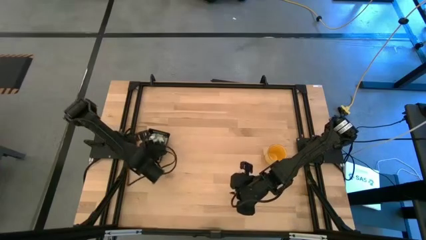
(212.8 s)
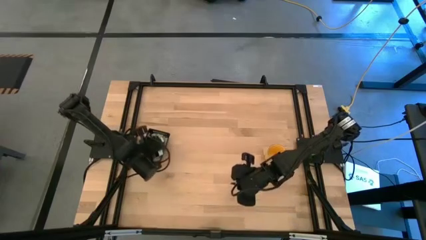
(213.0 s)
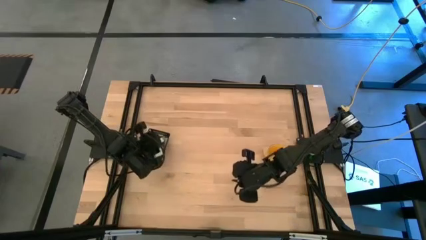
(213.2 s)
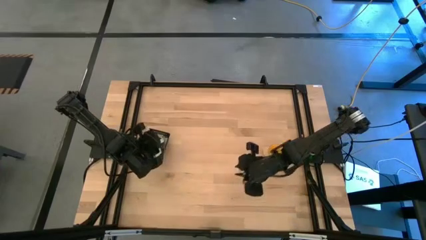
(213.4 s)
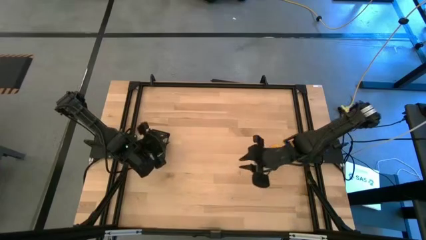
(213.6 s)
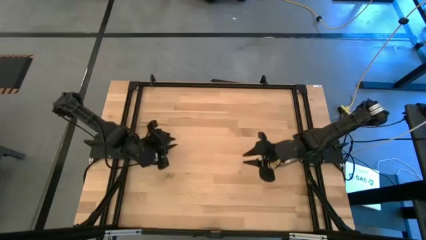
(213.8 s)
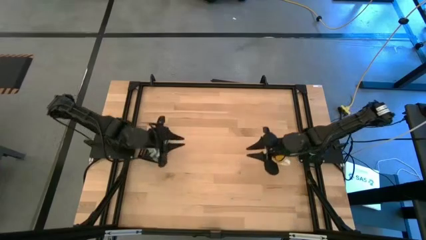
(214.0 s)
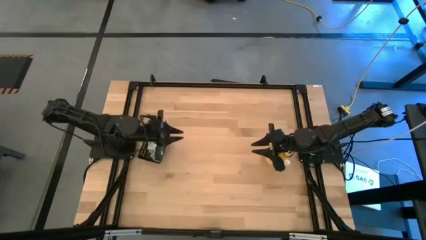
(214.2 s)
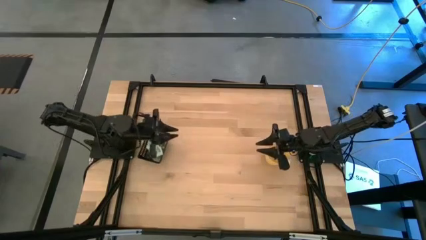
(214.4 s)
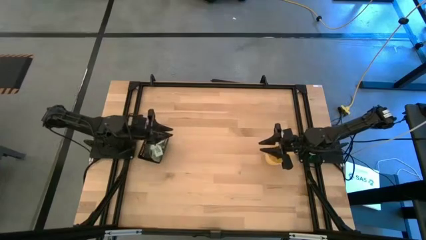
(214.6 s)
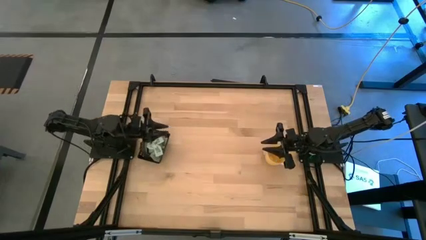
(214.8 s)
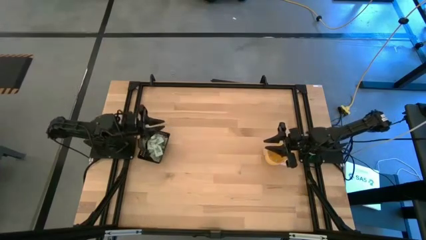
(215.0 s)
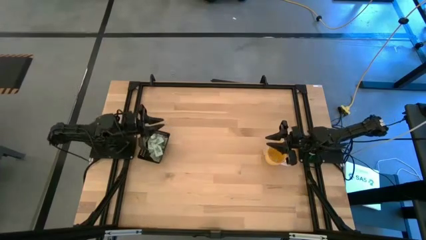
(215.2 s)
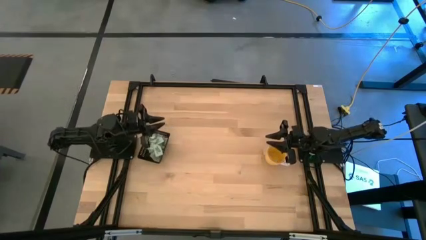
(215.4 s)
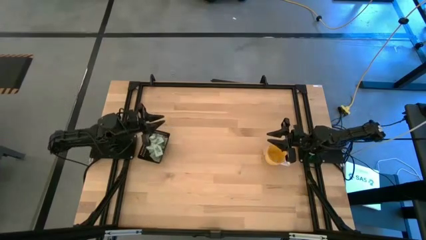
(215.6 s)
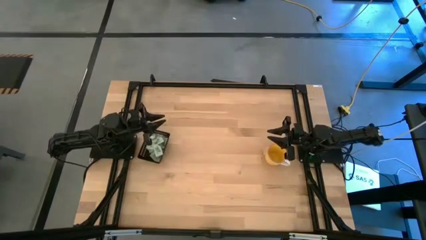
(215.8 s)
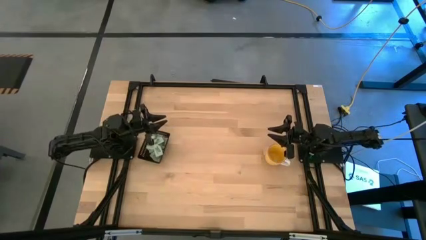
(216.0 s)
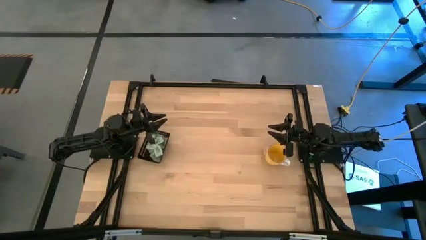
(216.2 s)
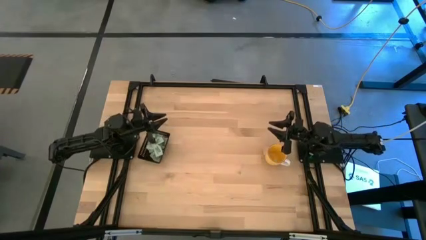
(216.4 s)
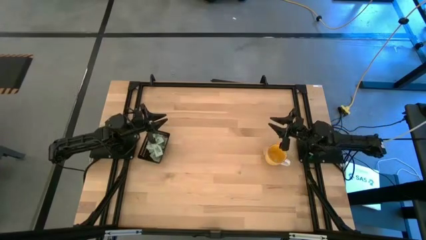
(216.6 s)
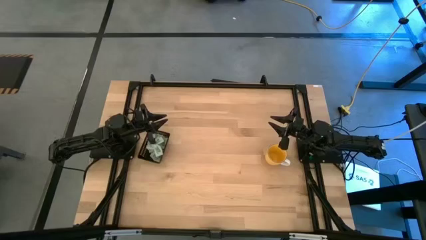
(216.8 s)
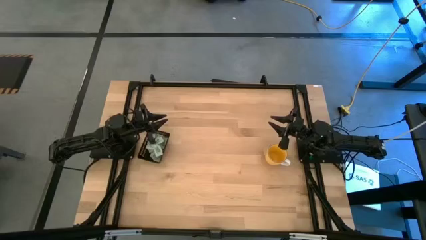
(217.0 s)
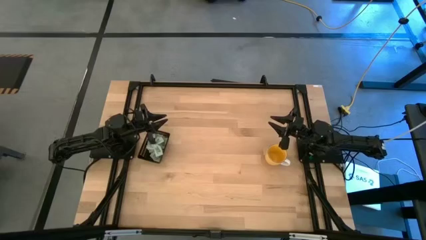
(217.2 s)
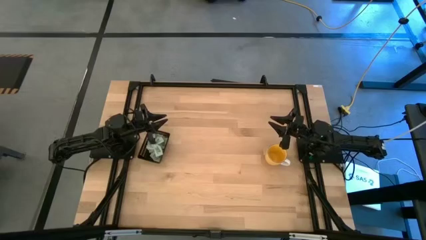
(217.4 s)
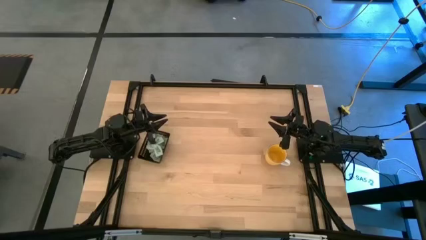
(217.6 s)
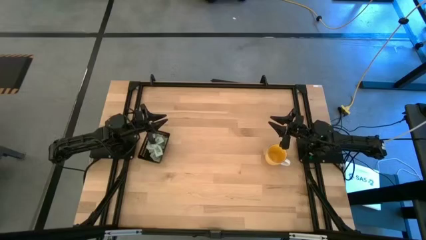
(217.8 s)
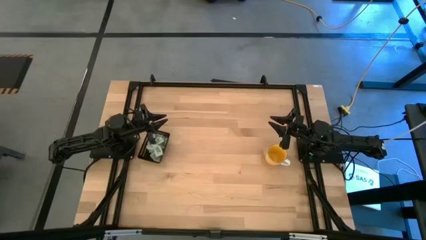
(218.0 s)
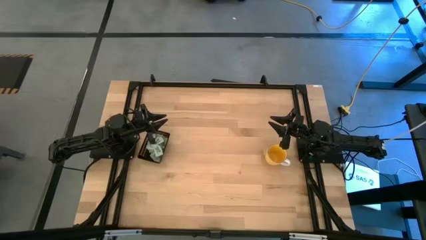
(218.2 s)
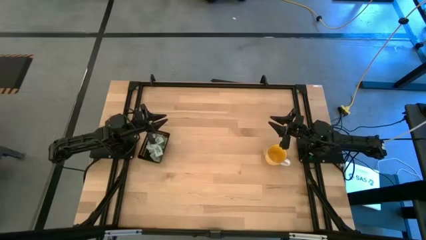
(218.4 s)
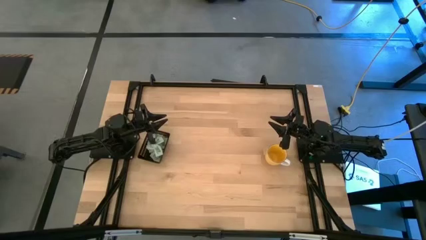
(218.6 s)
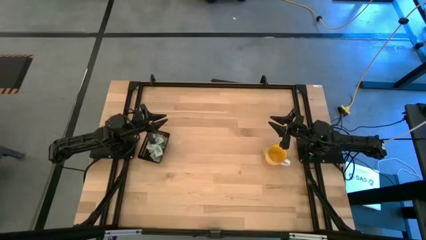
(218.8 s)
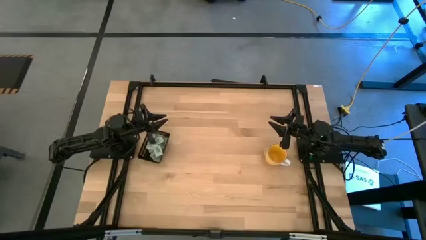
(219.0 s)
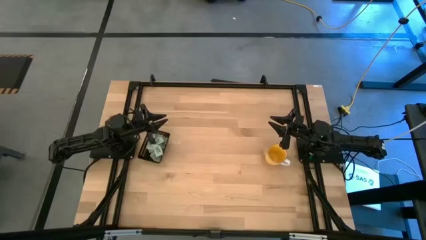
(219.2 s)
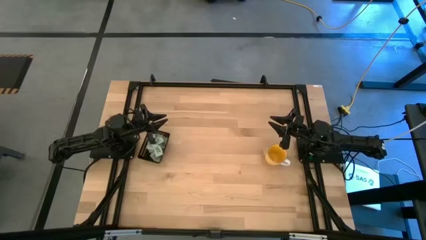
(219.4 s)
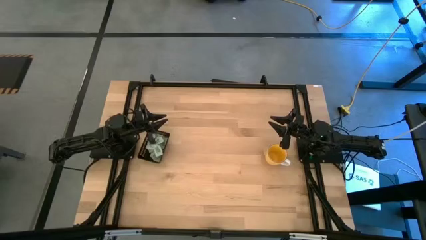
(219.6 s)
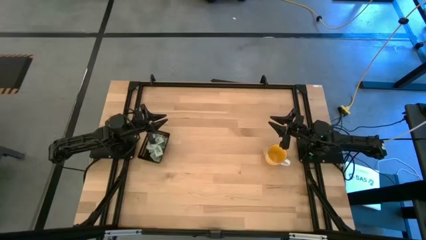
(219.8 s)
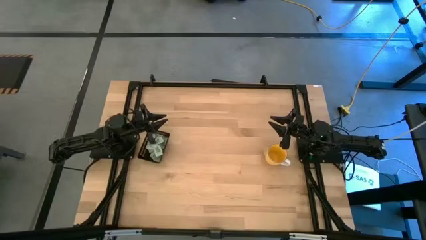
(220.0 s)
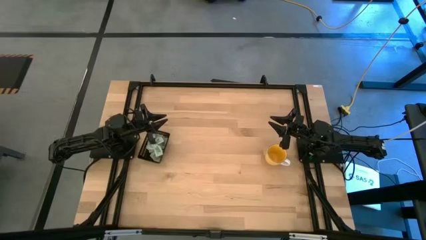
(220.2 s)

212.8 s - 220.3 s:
Task: Pick and place Stevia / Truvia into bins
Return to Home Position

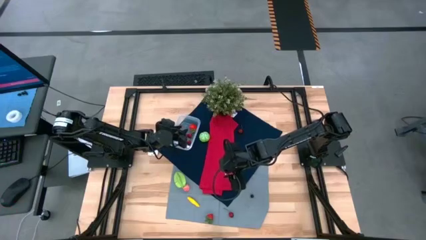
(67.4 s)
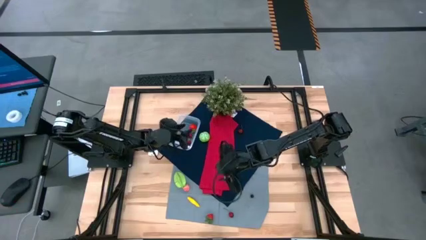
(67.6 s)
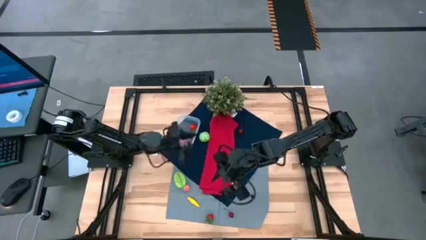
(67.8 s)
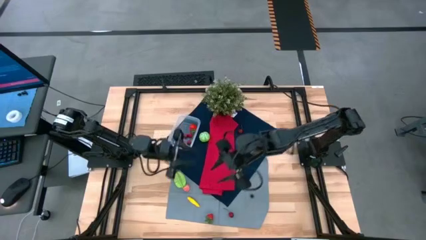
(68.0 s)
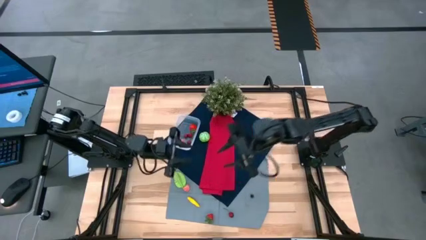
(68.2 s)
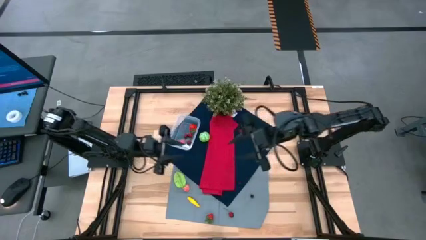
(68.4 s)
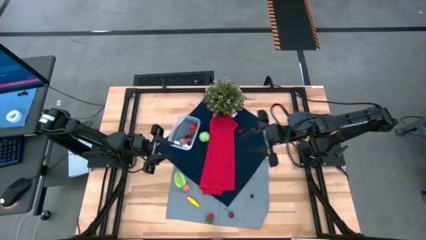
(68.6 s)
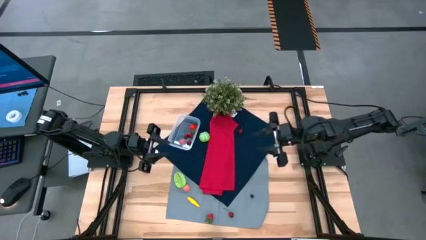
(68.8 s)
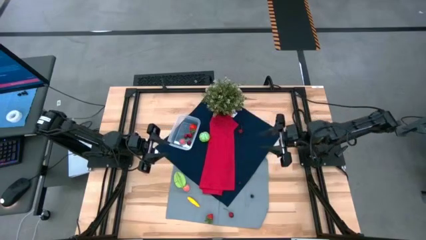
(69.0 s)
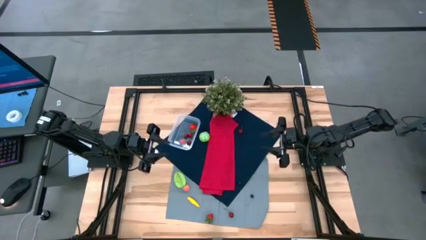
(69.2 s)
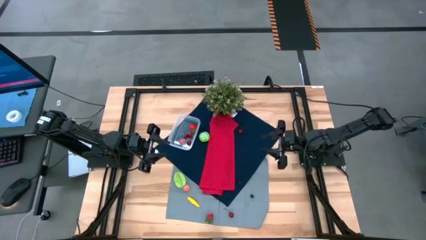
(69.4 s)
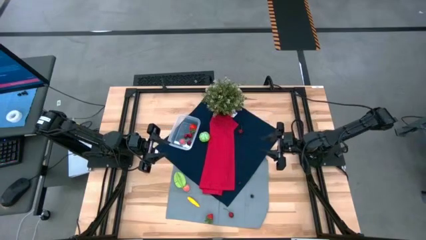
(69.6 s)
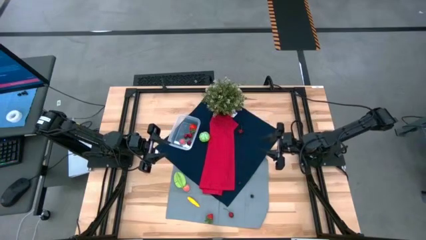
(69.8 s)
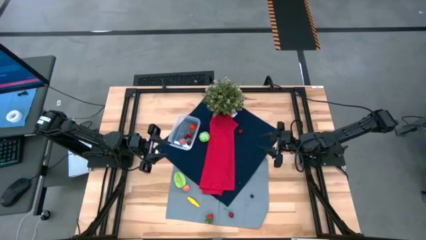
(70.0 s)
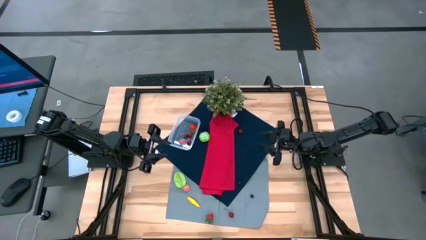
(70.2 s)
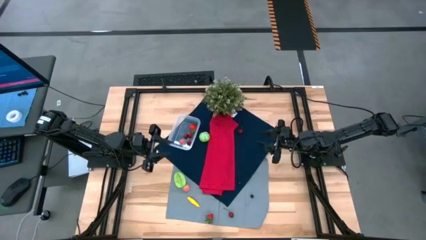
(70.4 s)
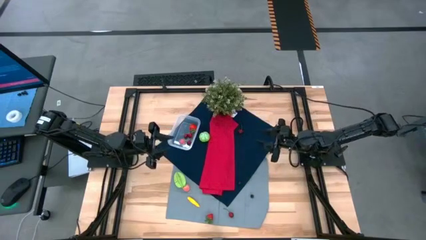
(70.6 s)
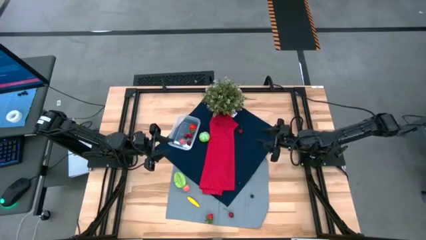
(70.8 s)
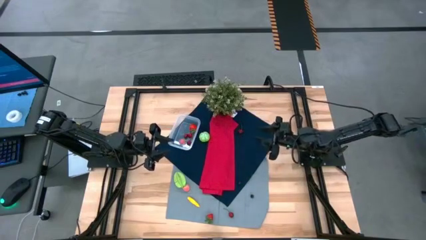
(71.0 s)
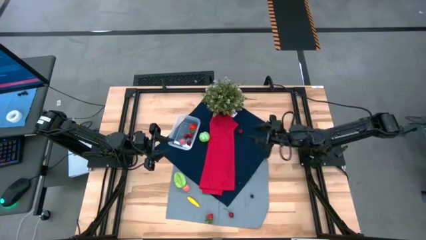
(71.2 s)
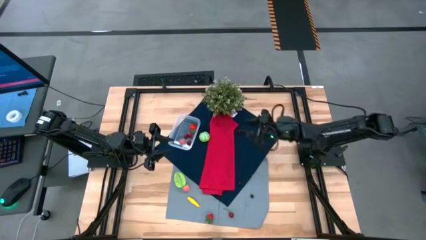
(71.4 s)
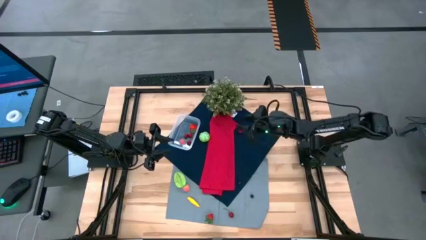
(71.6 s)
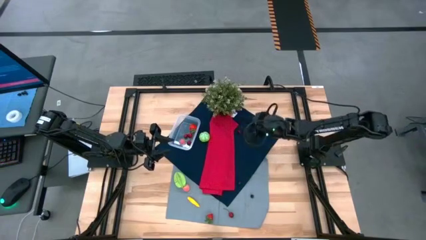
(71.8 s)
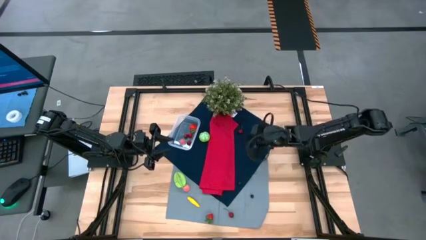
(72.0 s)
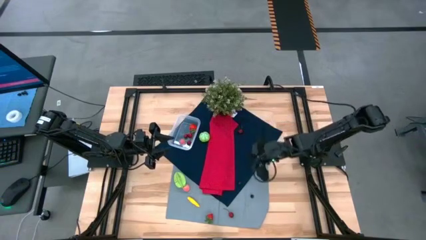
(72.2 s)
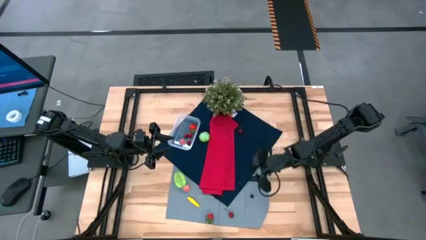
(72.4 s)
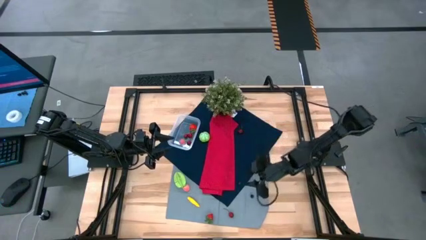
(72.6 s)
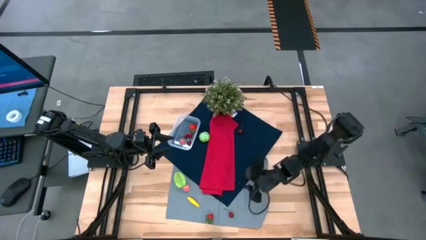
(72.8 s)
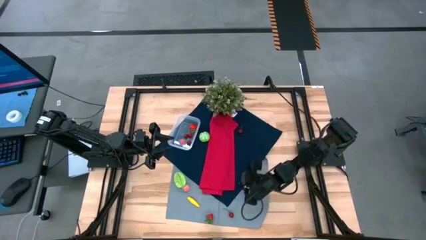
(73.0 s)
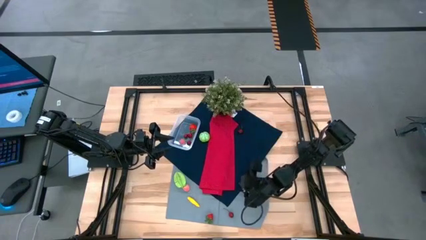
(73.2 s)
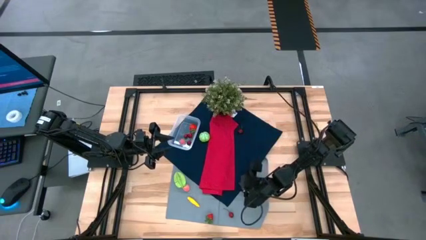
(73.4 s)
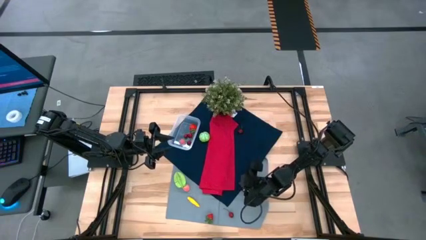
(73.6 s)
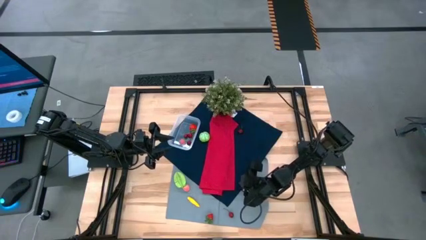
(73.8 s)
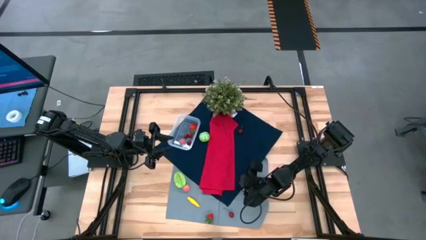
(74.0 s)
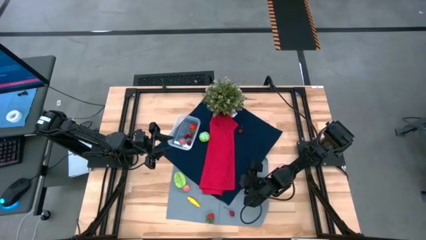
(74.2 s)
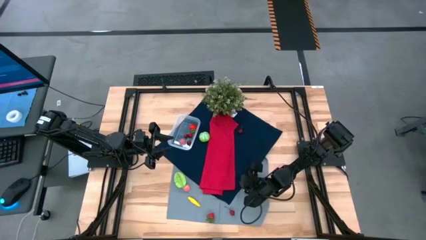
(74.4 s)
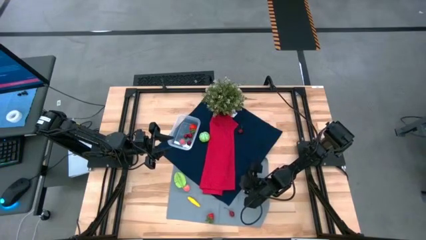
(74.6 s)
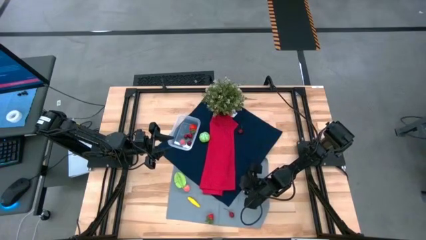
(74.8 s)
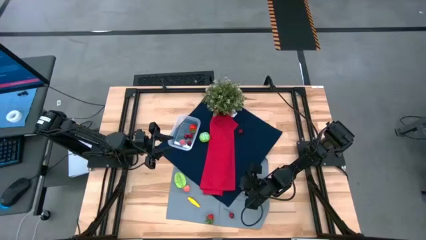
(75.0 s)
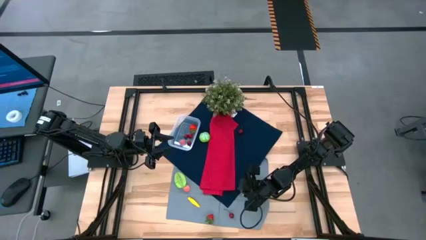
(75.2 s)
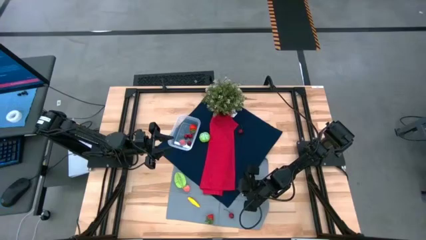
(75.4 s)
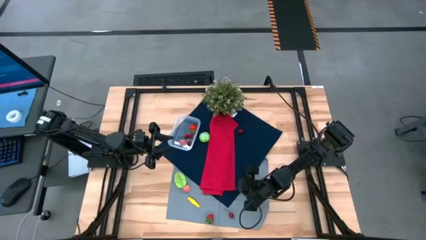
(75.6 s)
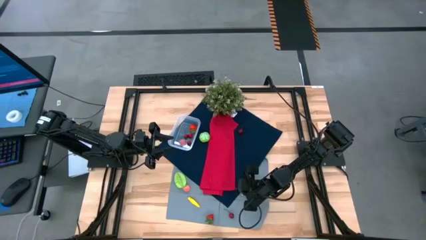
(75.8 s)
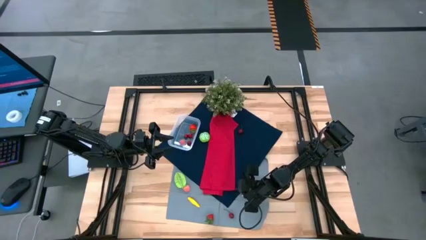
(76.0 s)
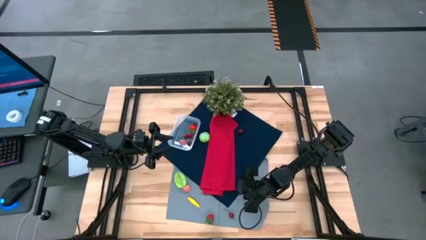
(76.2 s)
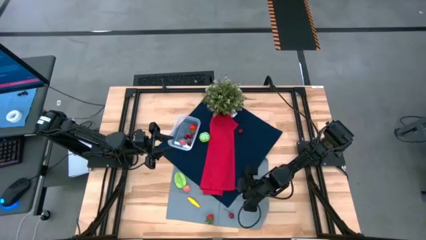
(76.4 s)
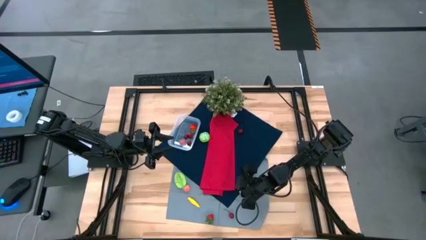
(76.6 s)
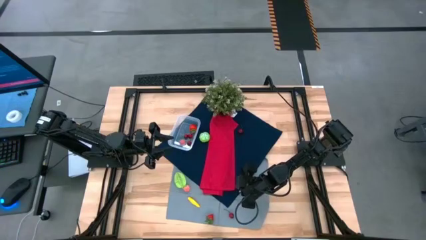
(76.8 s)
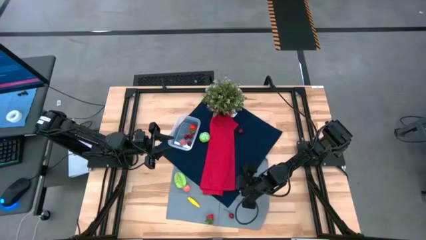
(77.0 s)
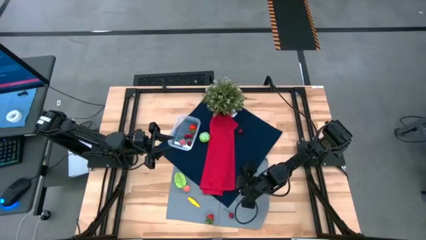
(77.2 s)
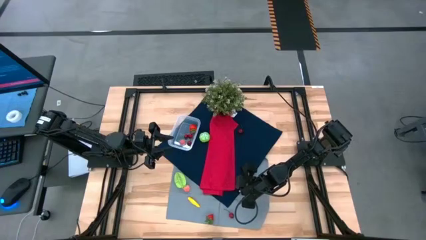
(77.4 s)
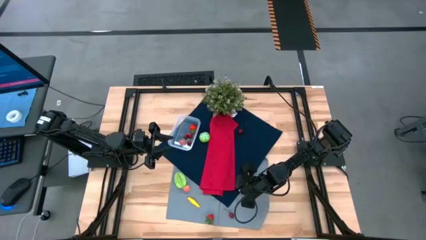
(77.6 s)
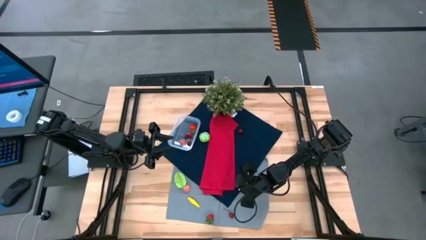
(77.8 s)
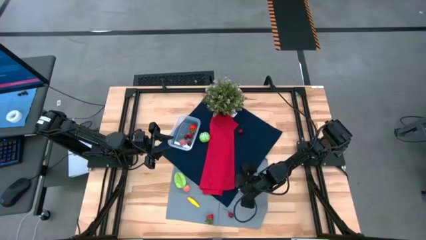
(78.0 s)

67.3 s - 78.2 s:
Task: Pick and placing Produce into tupperware
Put the left blueberry into the transparent bin
